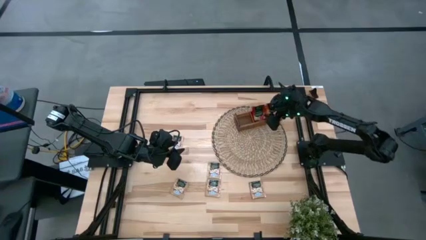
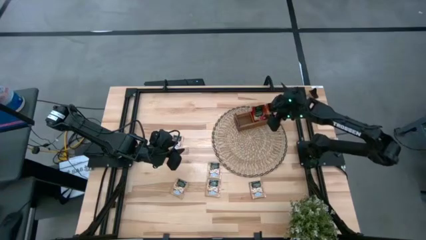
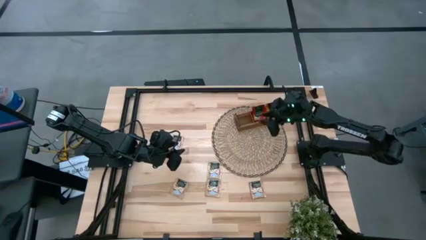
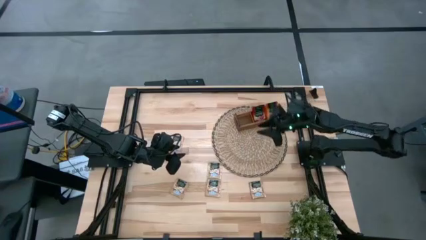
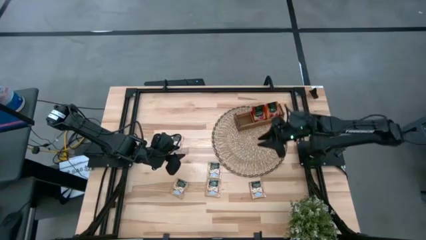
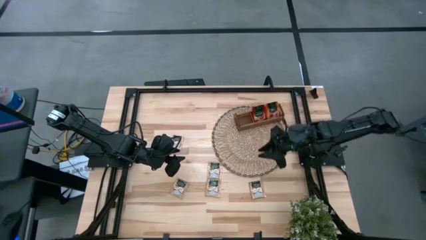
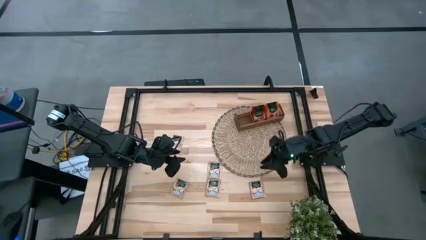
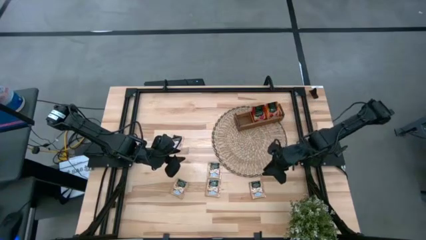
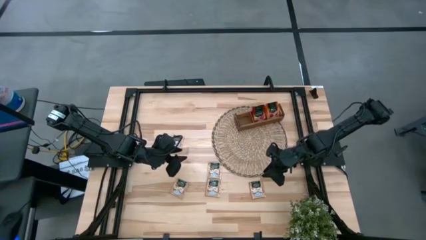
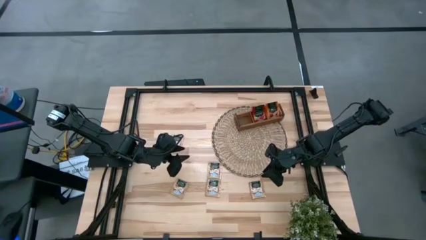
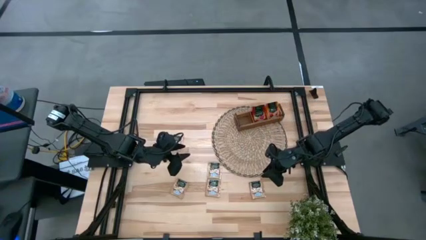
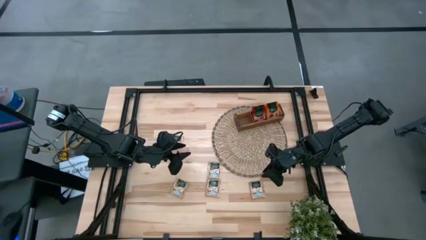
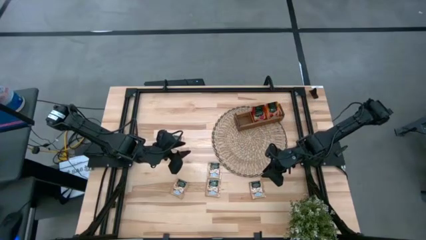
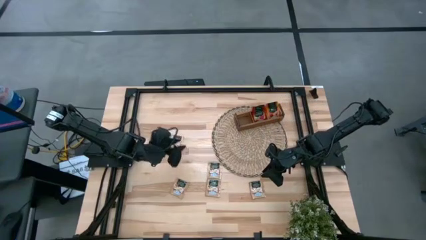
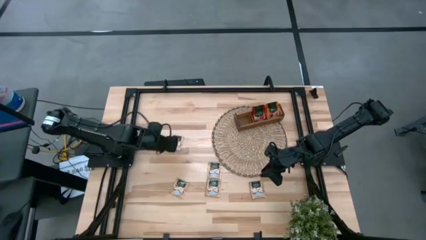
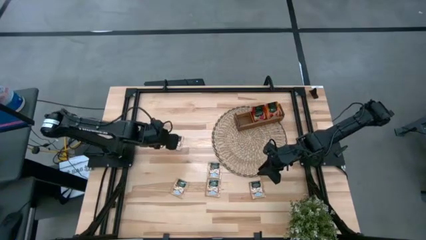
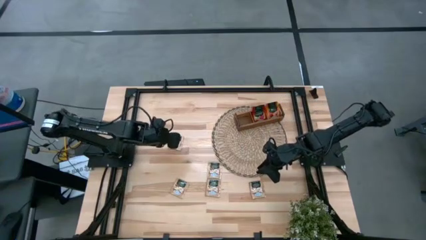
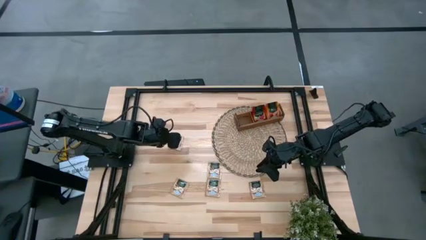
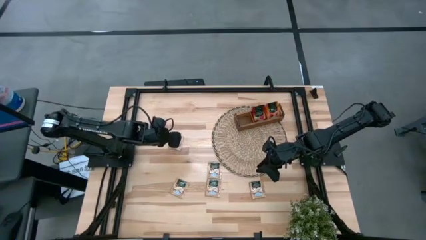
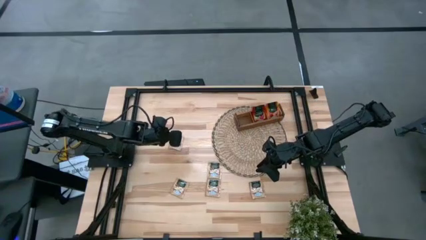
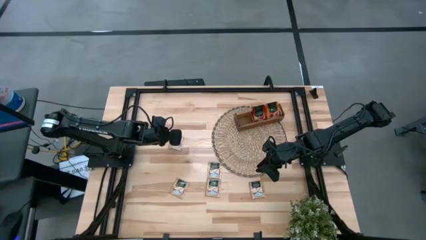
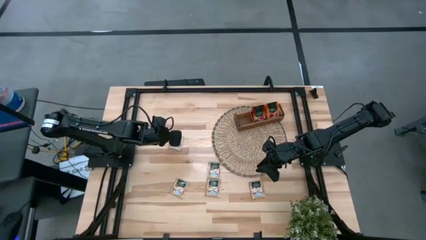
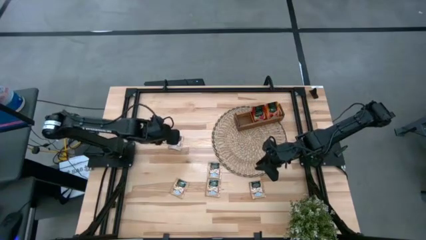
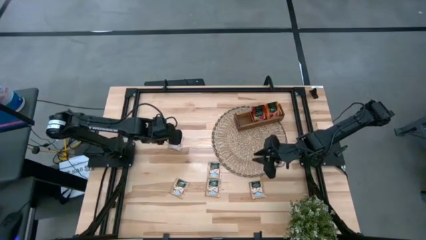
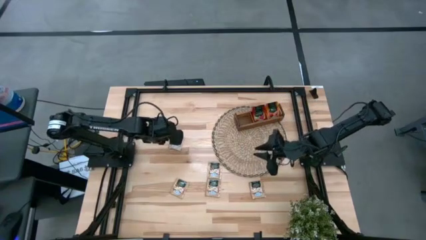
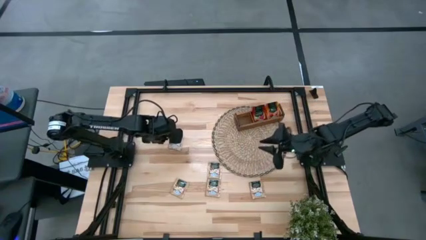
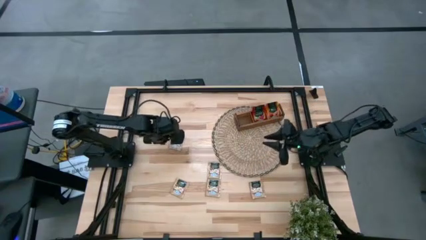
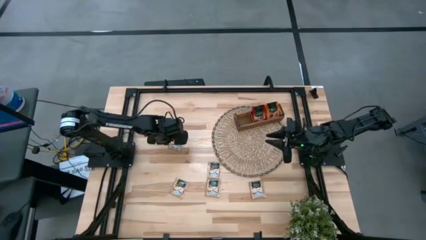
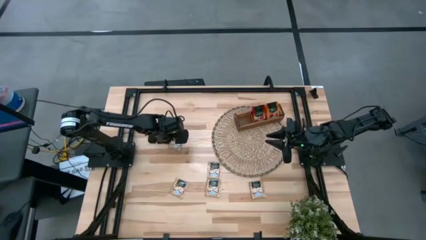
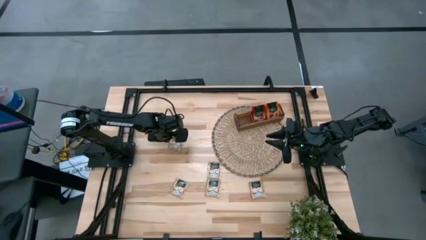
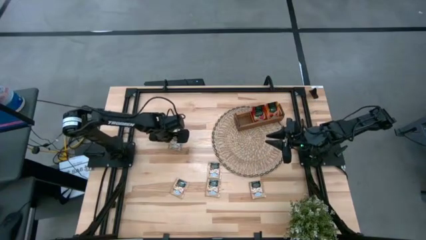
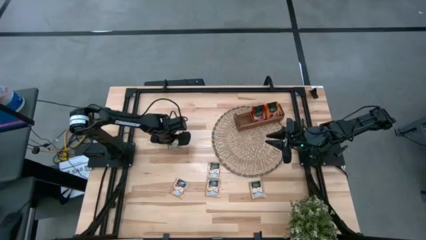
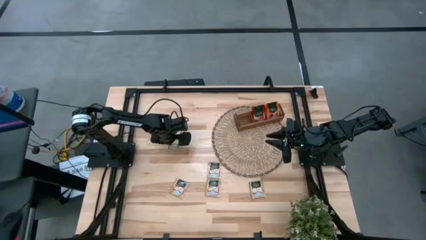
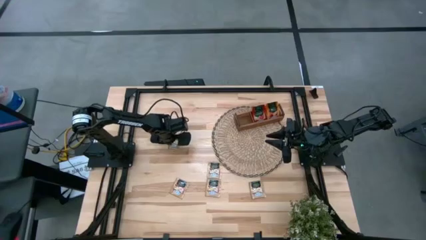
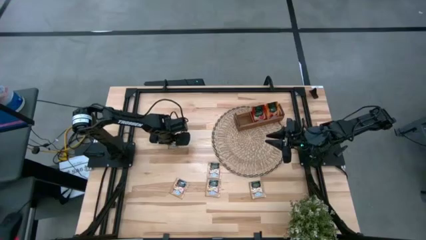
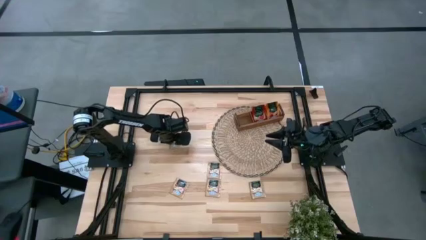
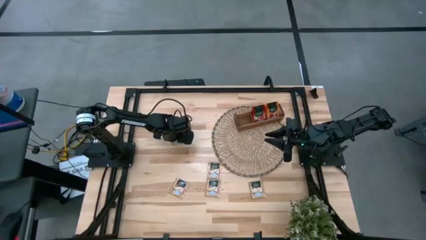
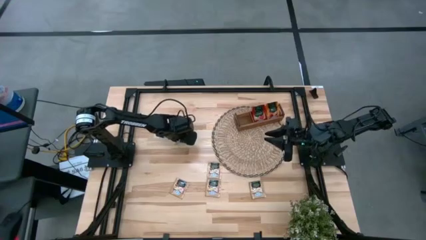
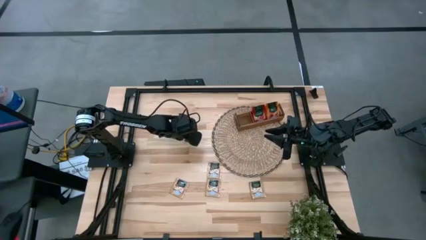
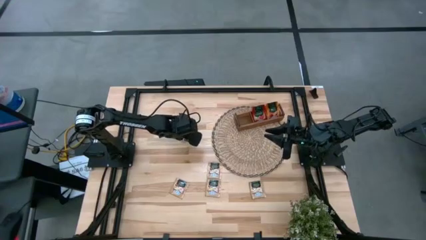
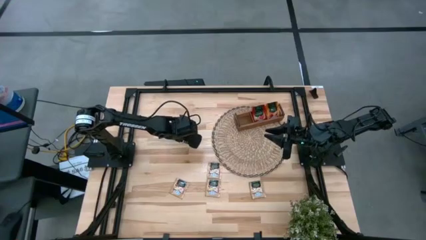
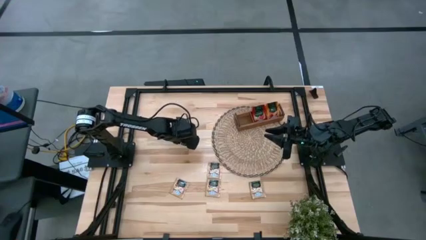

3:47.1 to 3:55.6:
Task: Pick & Place Tea
Put the brown tea pack into the left compartment of the brown organizer

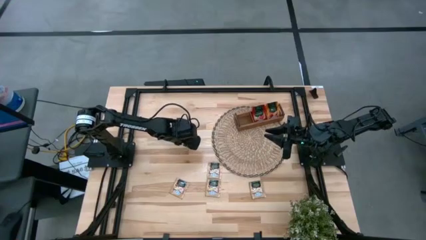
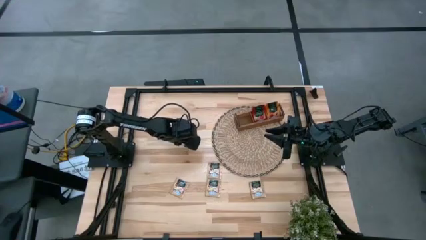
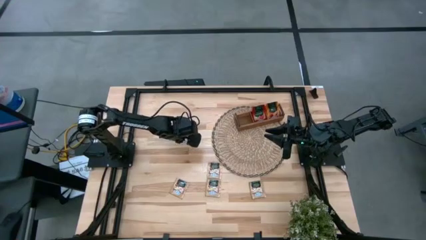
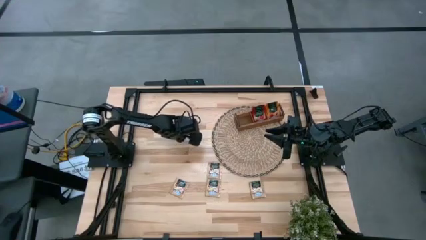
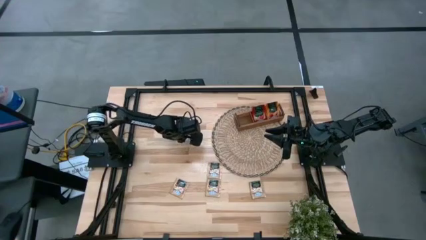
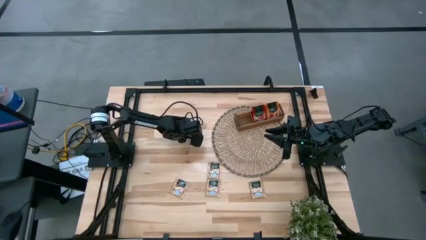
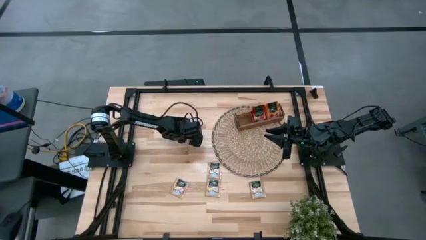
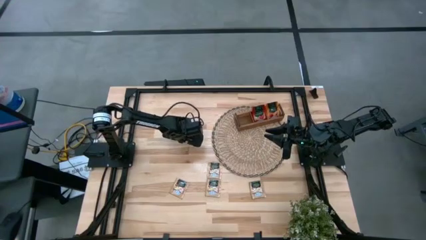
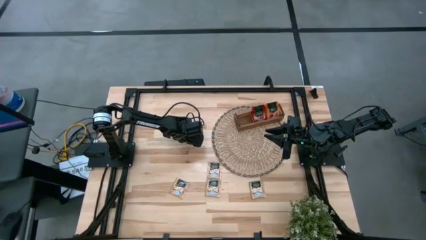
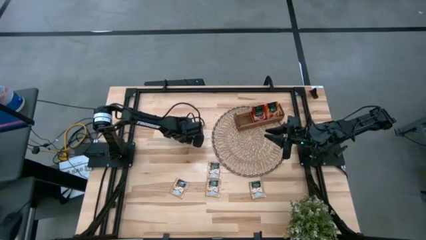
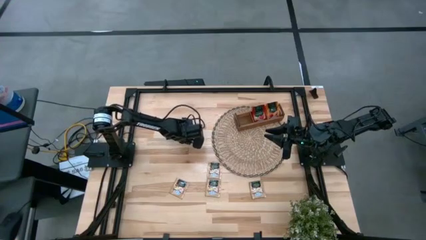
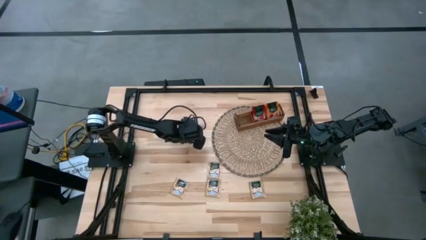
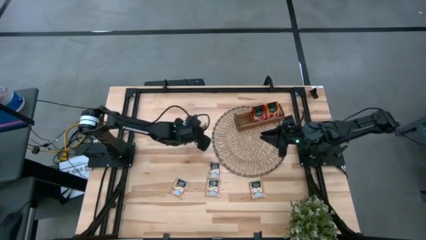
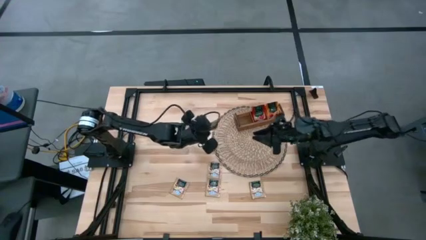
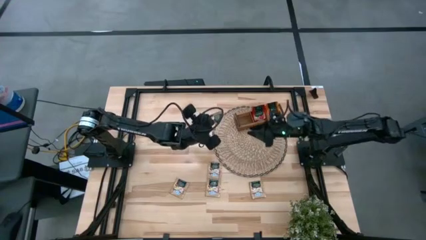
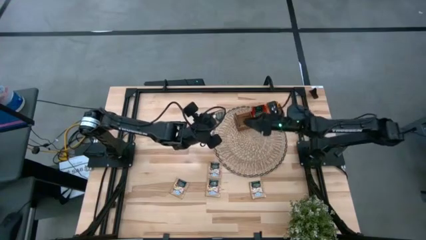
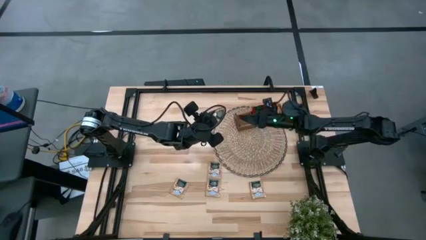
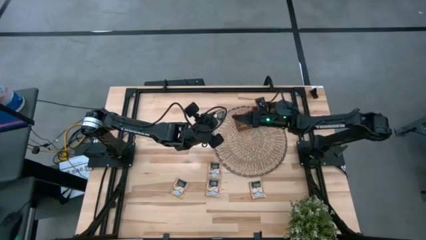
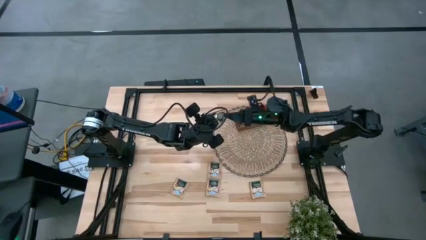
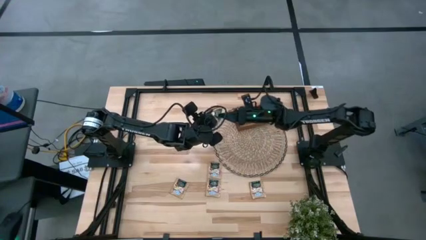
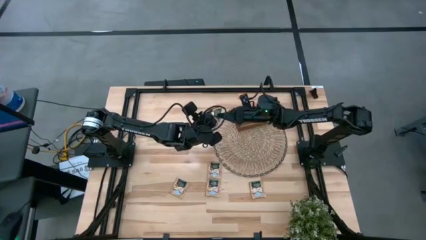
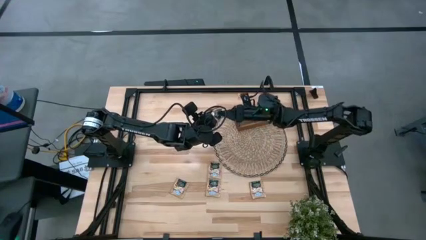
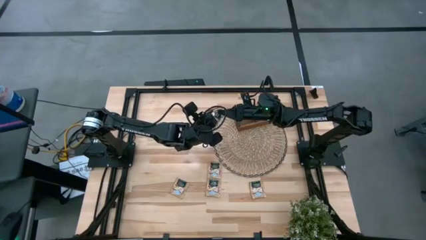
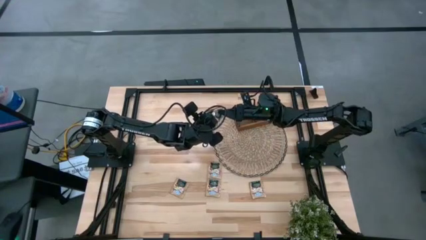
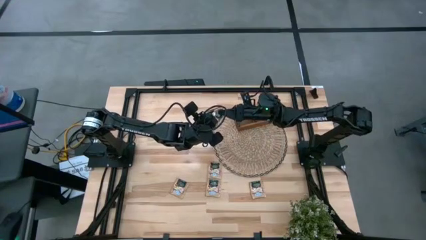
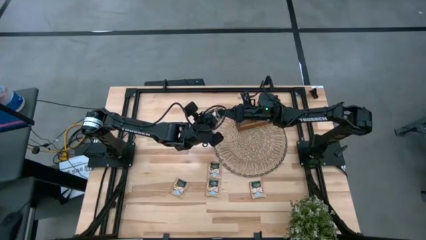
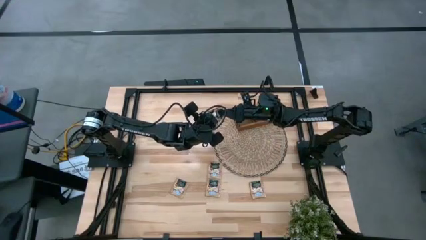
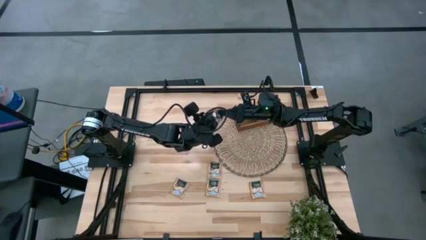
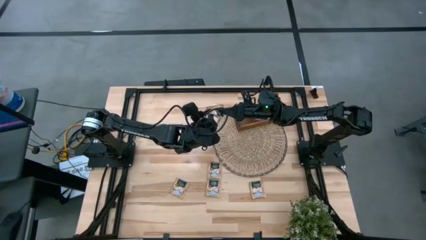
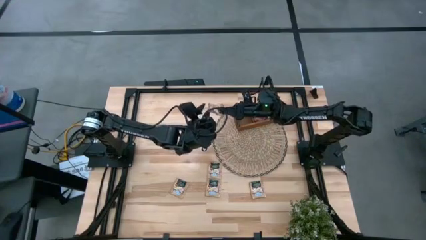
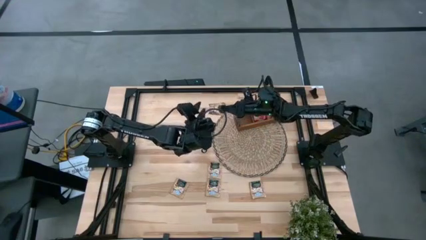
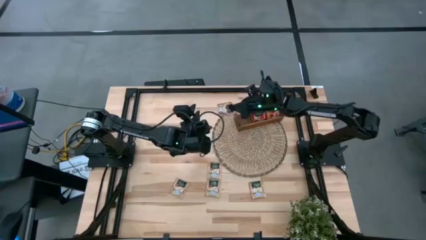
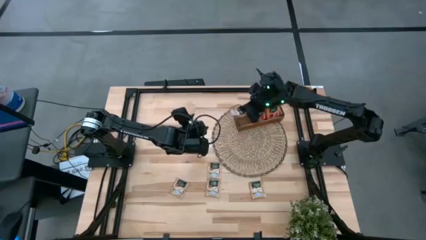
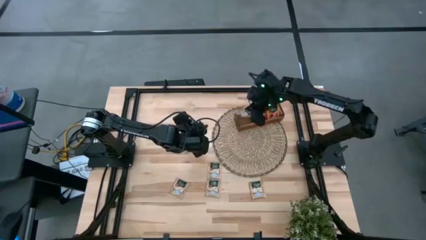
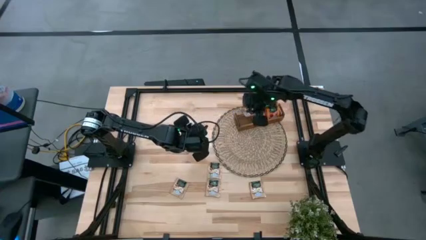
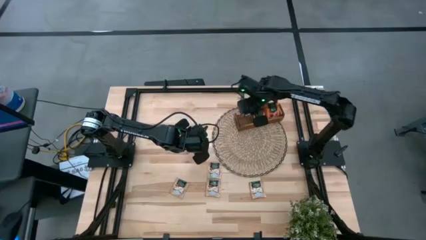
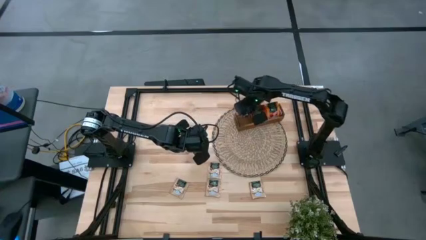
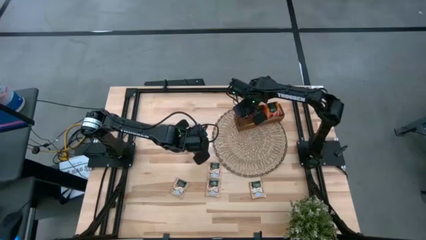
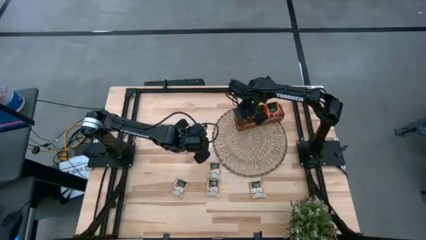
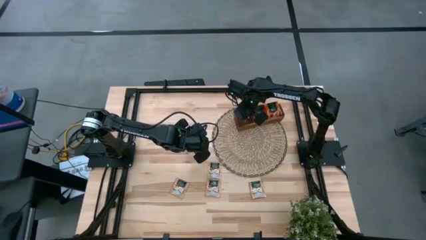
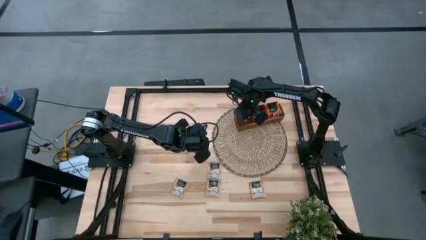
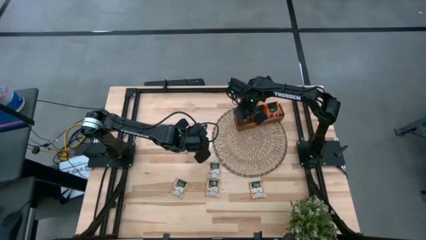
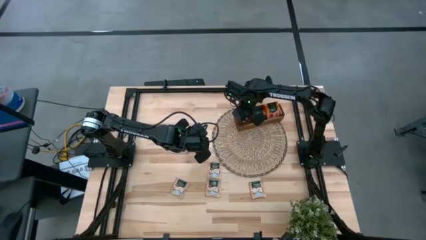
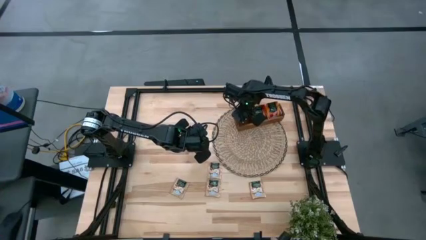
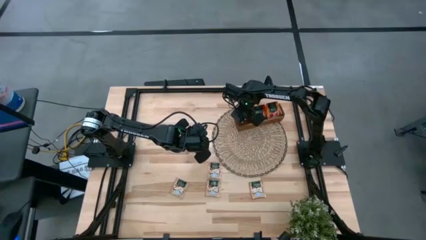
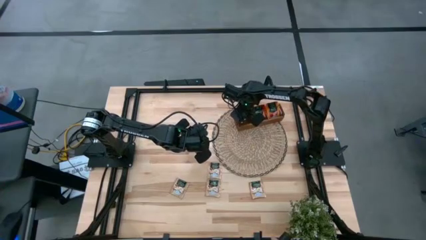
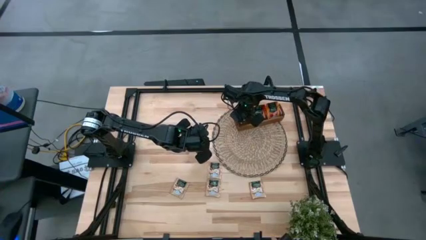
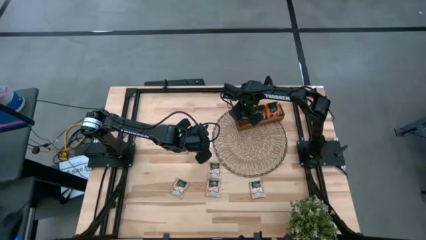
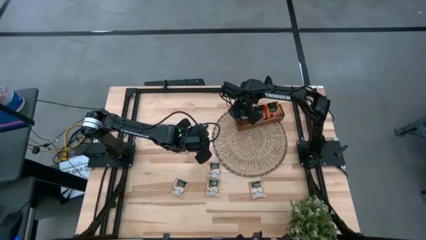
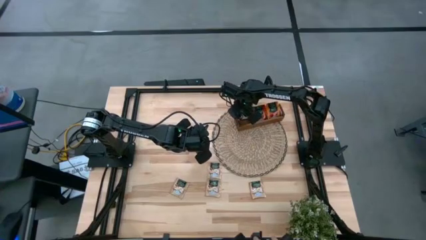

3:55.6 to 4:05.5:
Put the brown tea pack into the left compartment of the brown organizer
